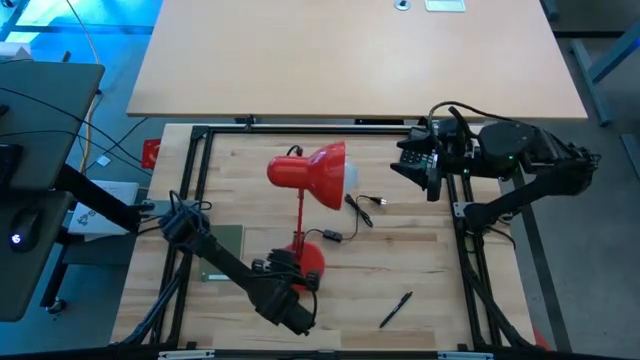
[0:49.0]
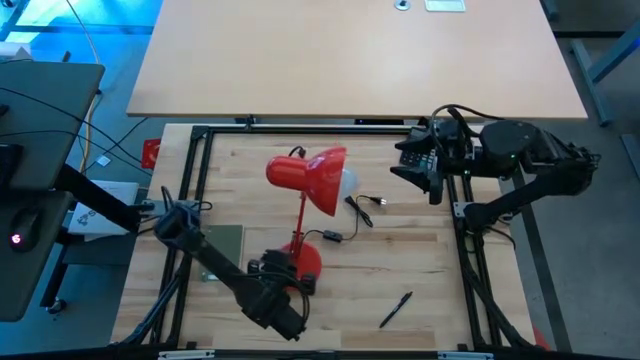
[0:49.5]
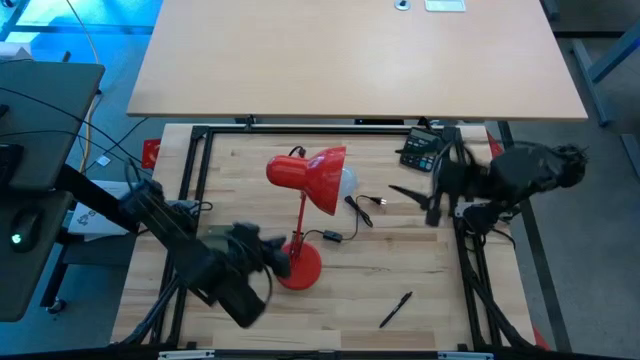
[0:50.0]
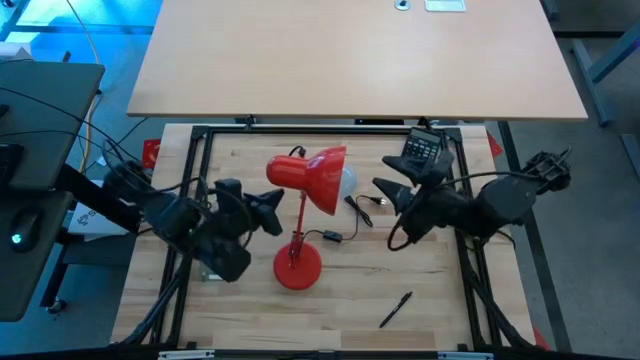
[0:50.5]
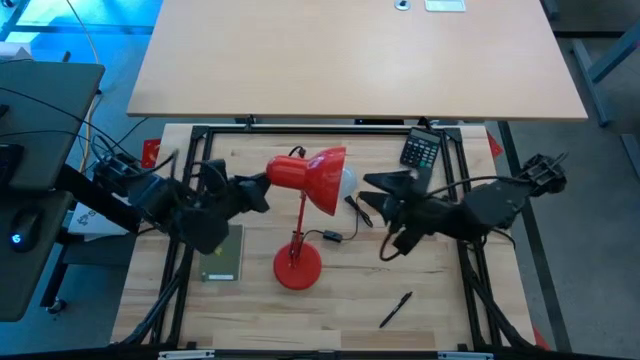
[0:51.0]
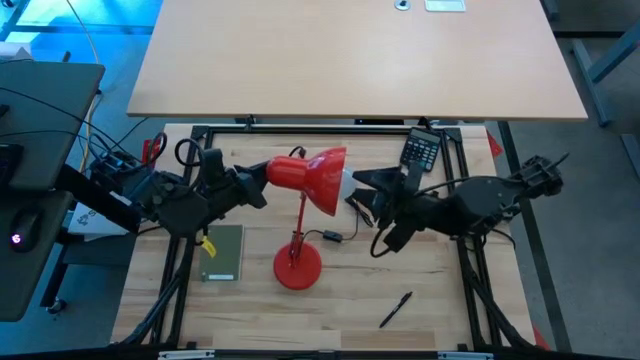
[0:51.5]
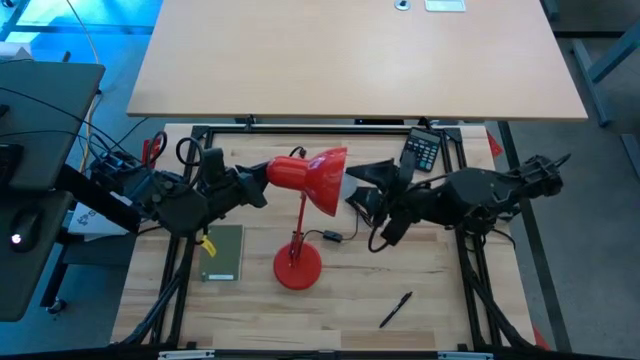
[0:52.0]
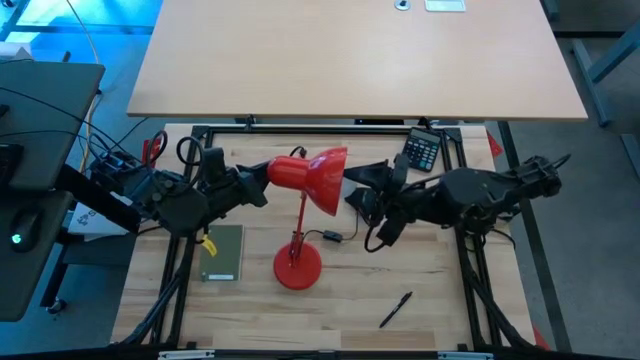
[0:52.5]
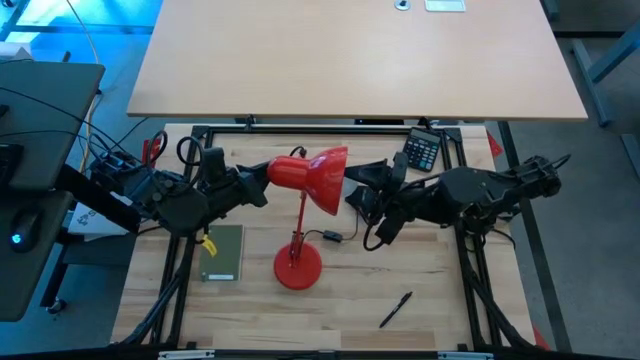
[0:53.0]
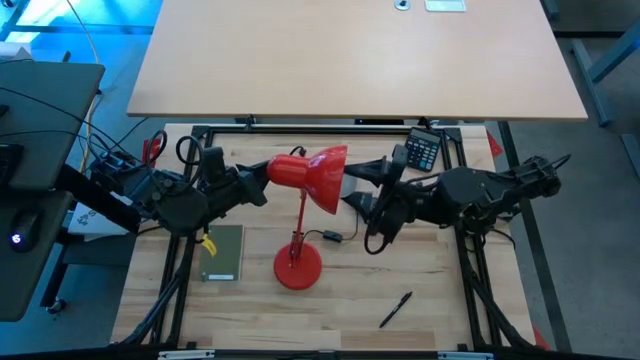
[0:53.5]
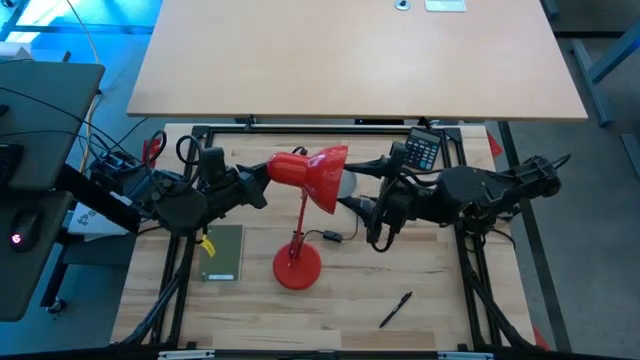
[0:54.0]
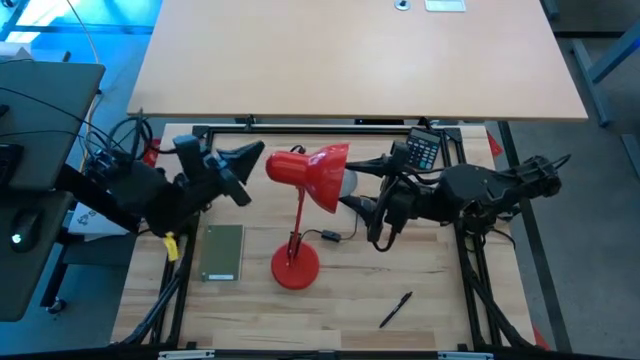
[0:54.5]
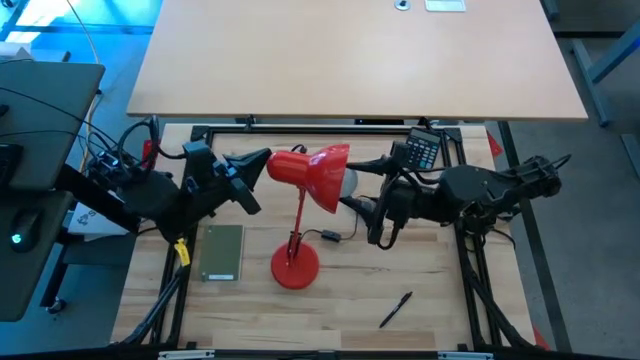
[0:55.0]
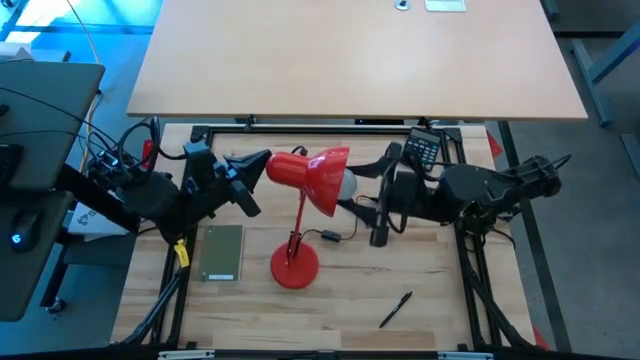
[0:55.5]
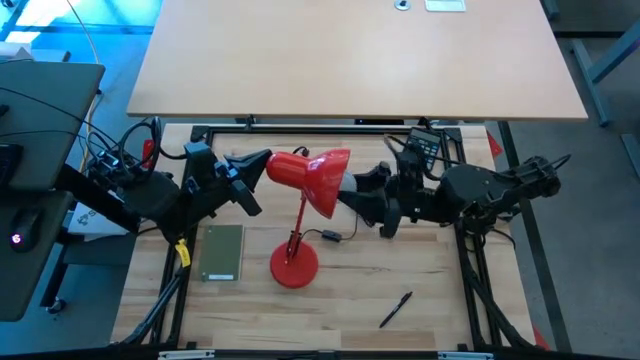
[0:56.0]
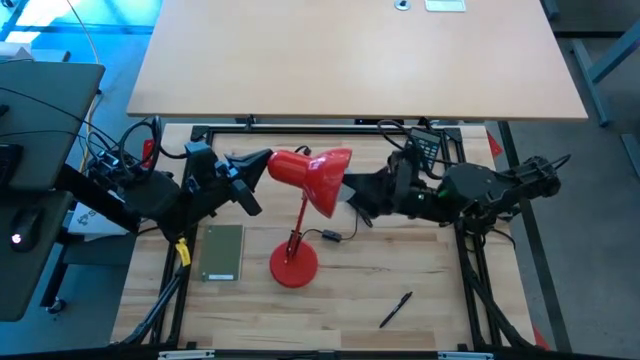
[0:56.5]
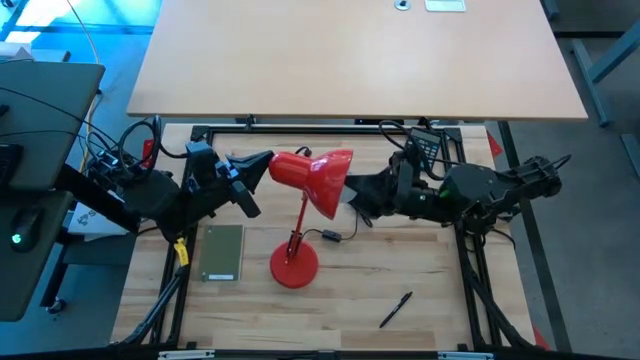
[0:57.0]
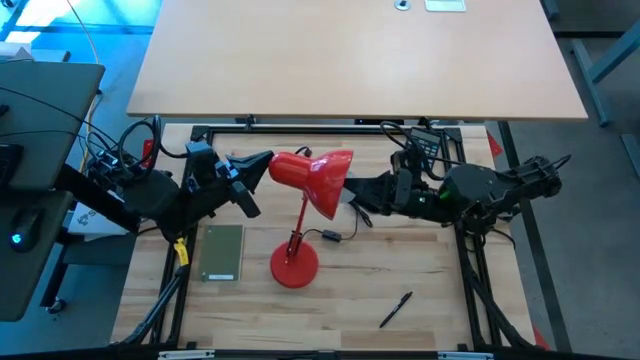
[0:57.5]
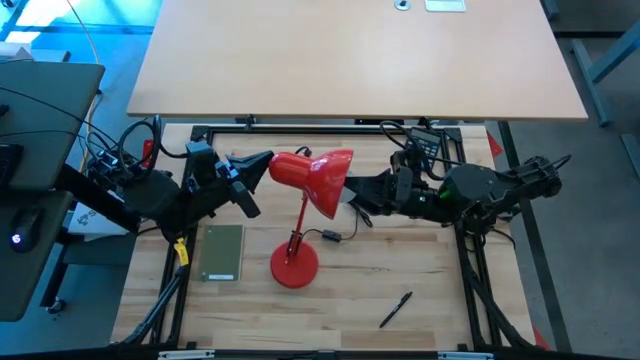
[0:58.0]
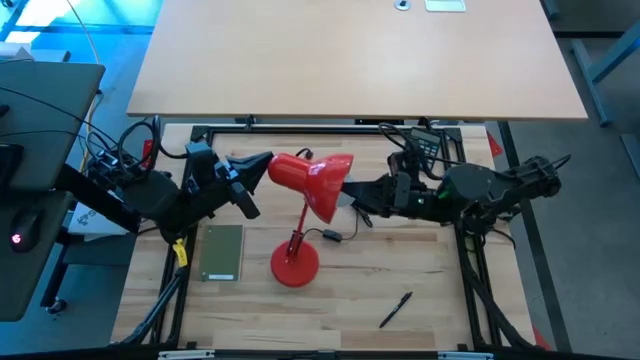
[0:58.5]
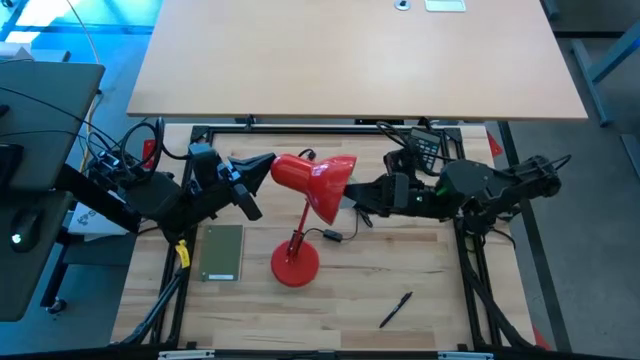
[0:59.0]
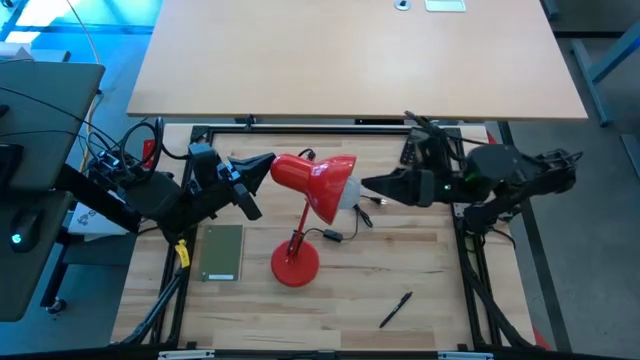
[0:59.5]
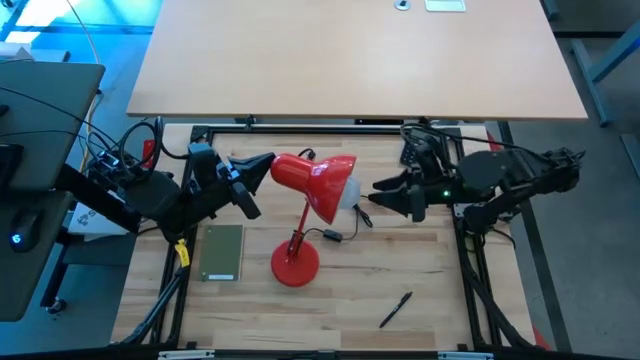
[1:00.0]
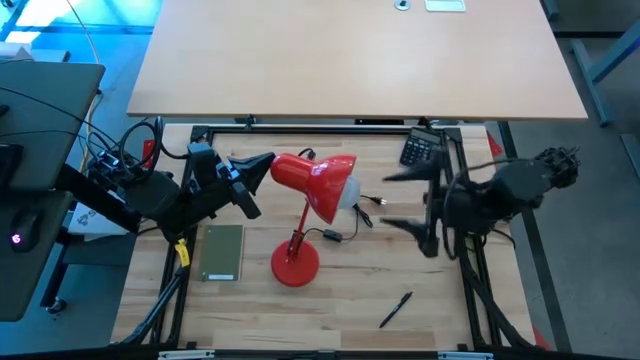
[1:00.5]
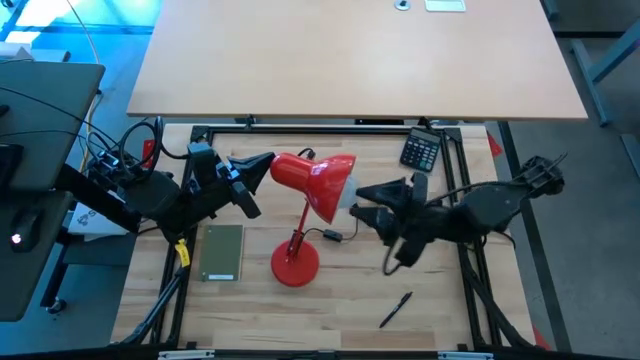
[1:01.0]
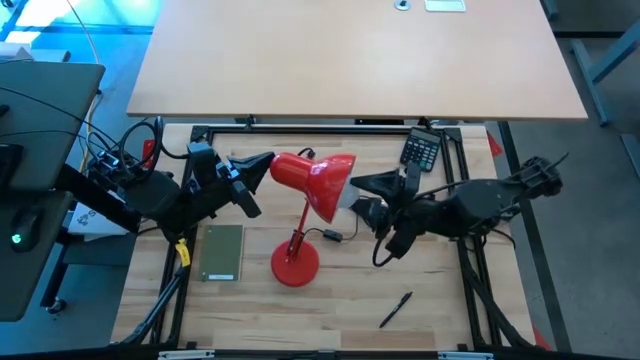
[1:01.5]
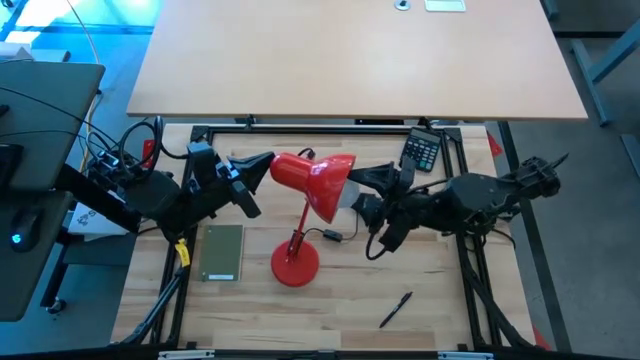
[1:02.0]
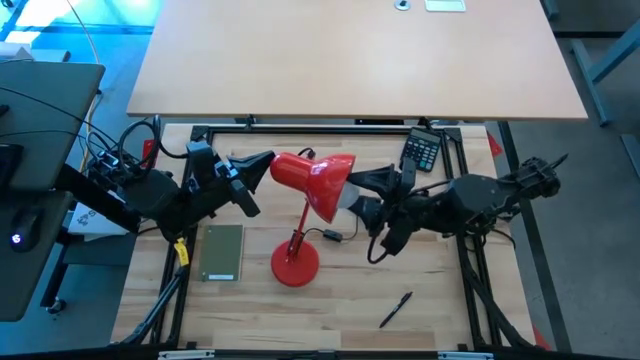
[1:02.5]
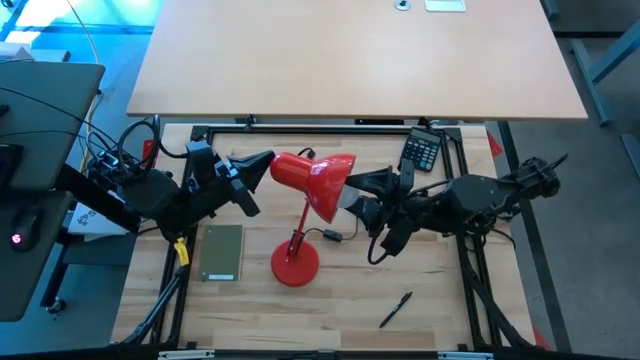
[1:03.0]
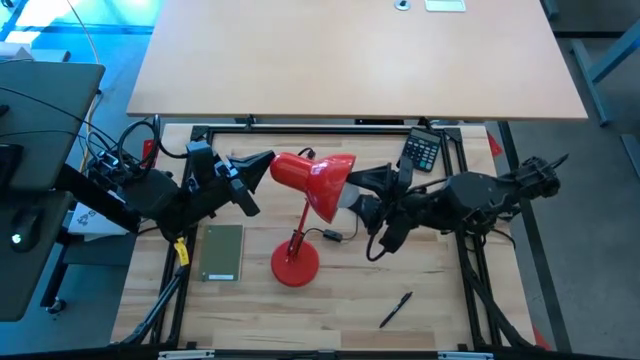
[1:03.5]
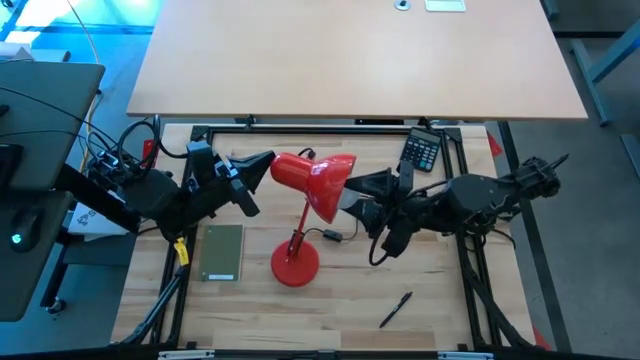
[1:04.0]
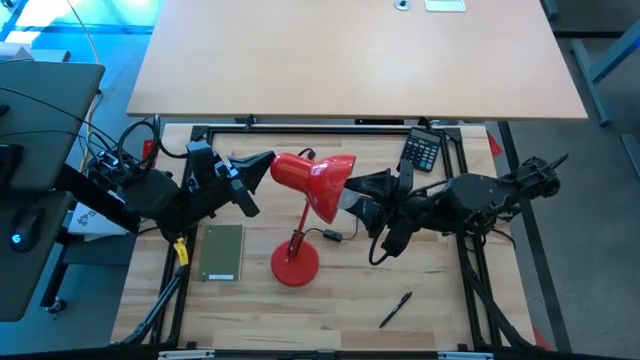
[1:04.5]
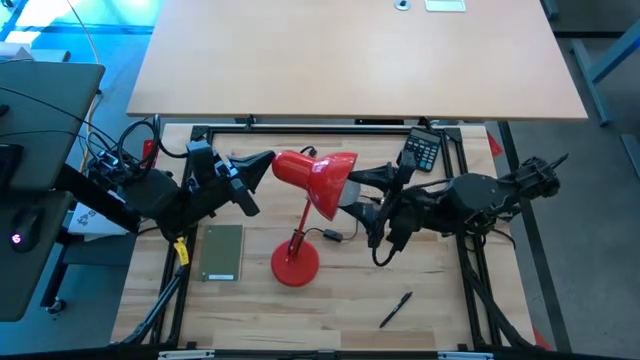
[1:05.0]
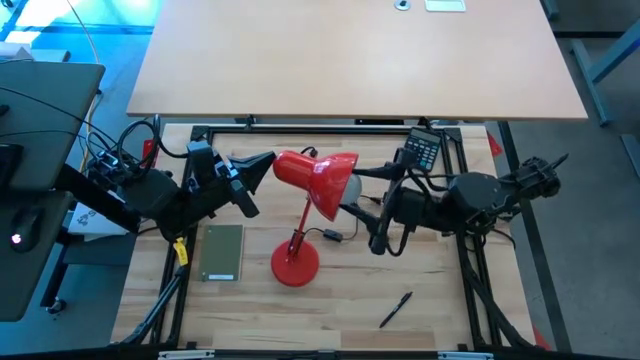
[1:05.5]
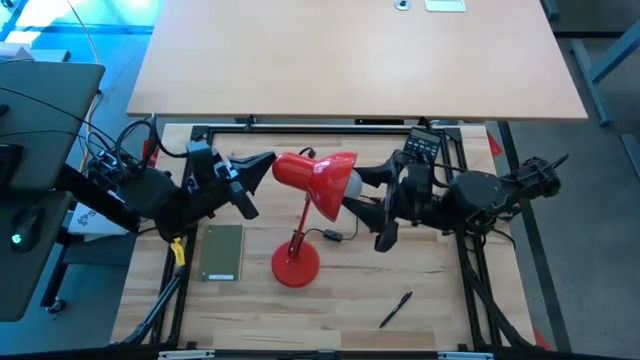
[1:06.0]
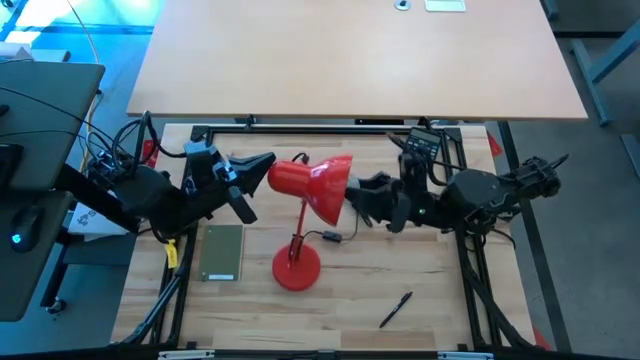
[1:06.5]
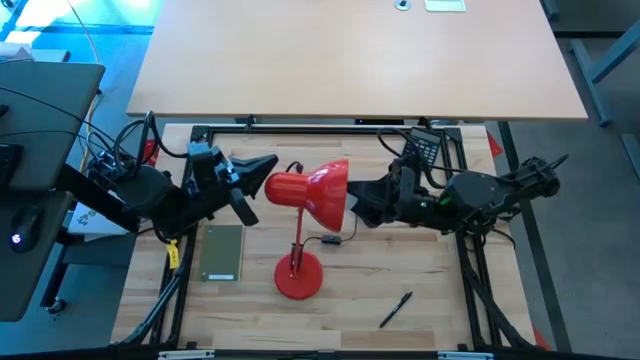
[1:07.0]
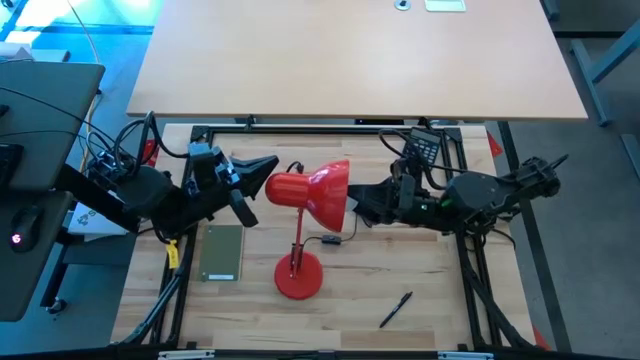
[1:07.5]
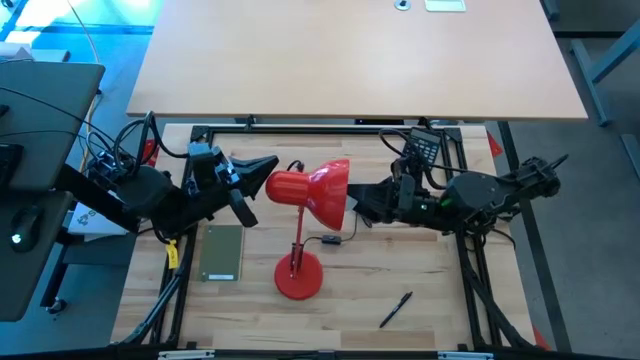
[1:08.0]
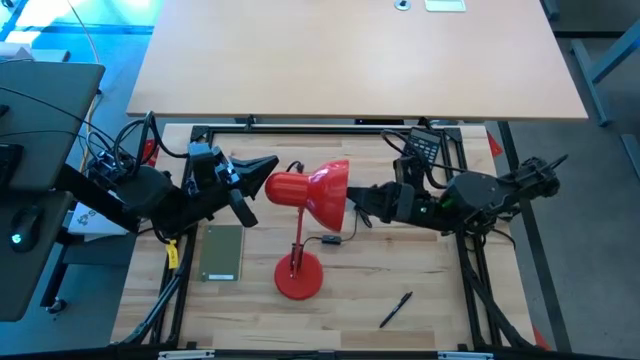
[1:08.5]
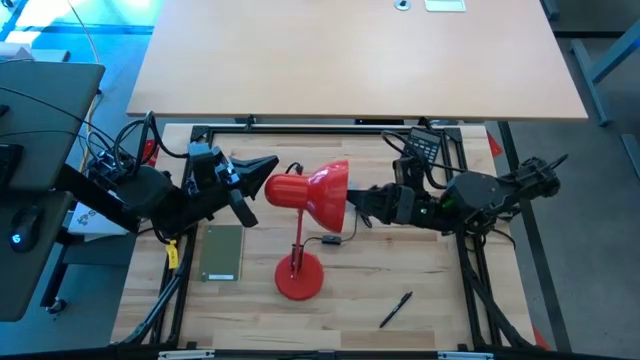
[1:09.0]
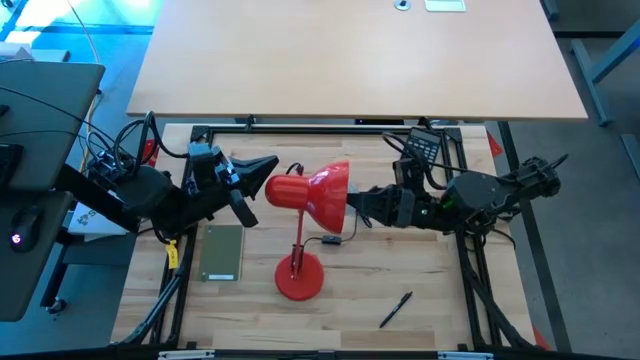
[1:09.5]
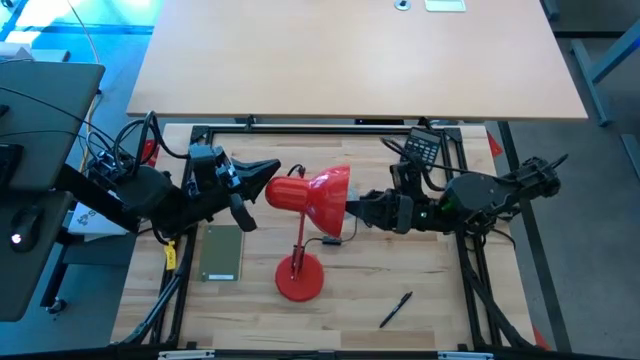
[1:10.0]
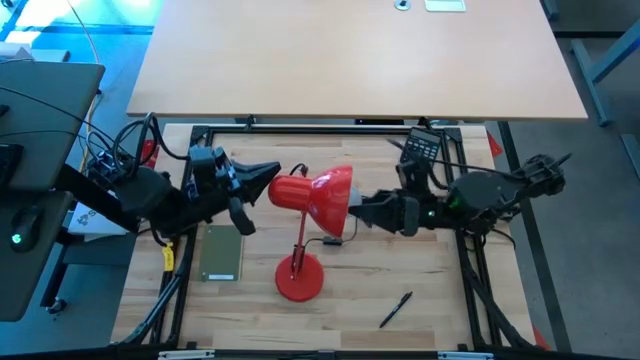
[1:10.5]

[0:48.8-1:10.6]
Task: Screw lightbulb
Insert the white lightbulb into the red lamp
